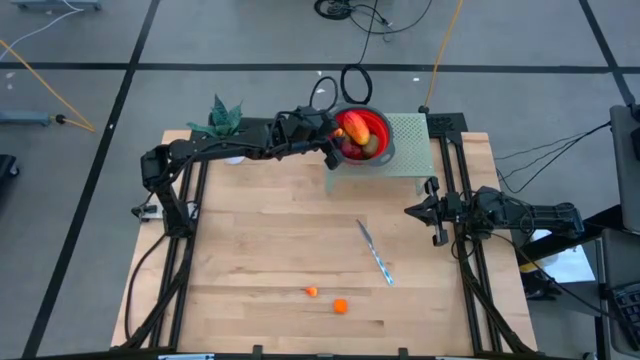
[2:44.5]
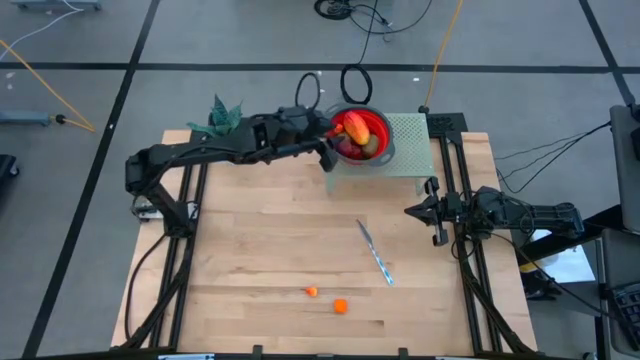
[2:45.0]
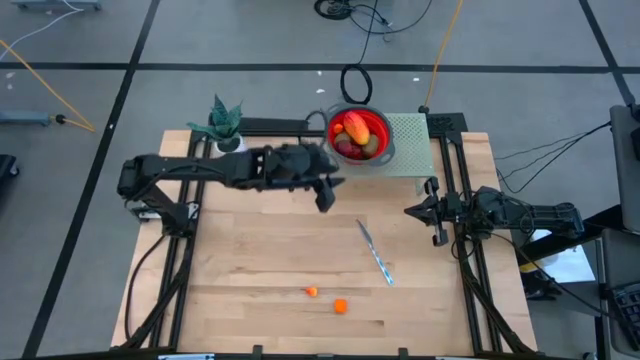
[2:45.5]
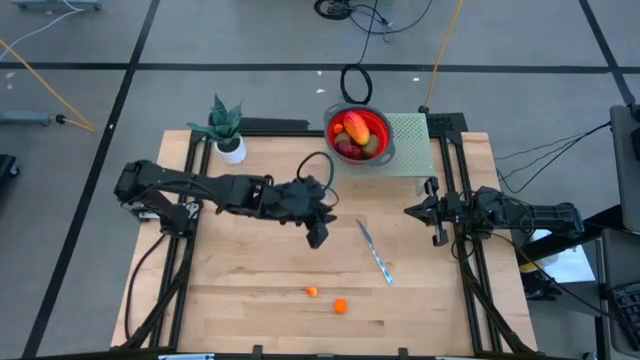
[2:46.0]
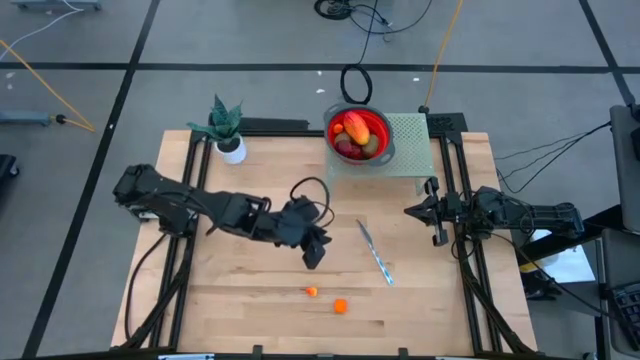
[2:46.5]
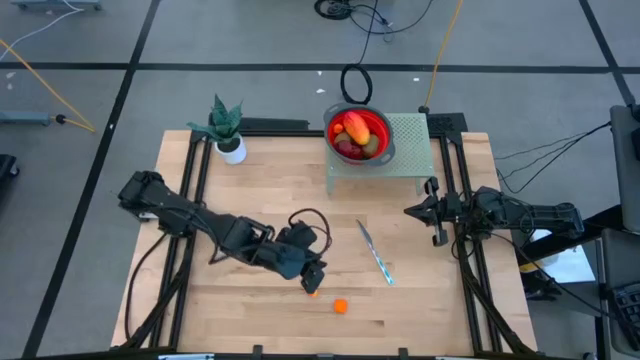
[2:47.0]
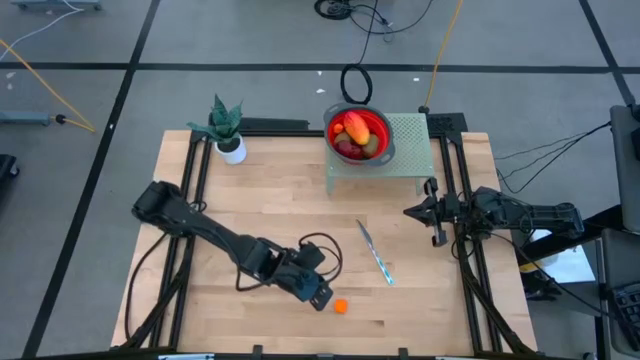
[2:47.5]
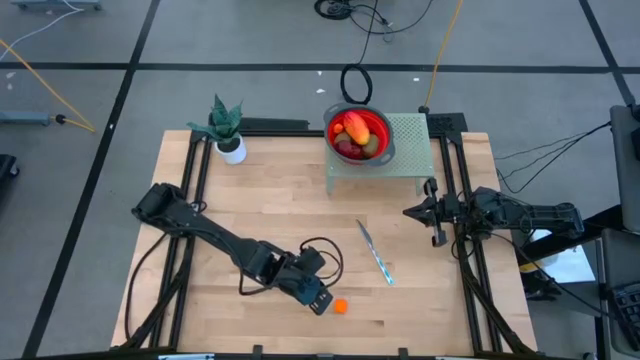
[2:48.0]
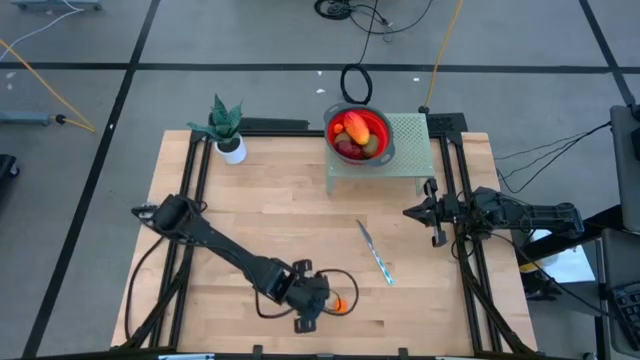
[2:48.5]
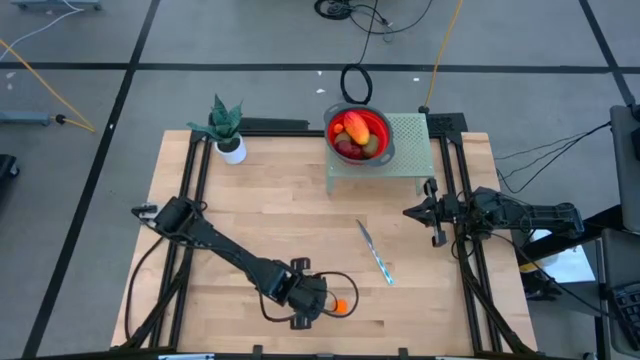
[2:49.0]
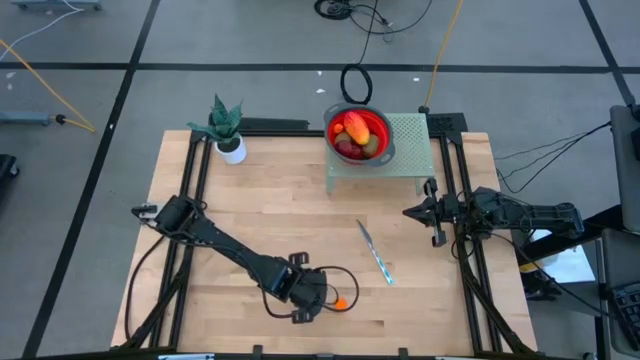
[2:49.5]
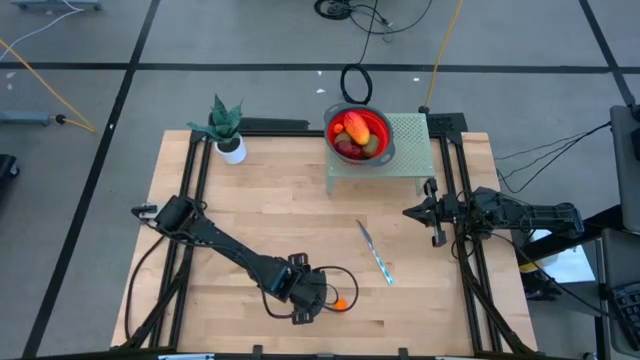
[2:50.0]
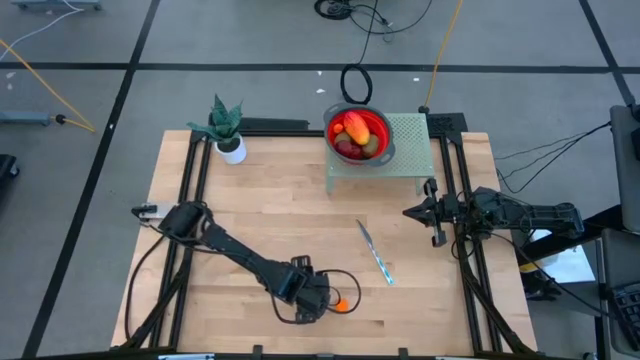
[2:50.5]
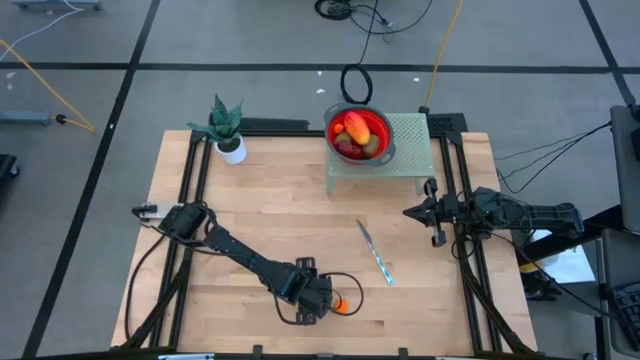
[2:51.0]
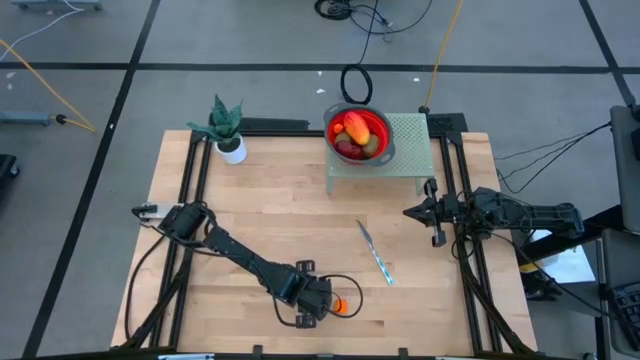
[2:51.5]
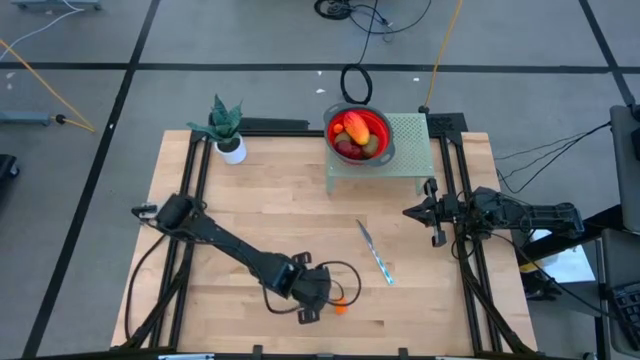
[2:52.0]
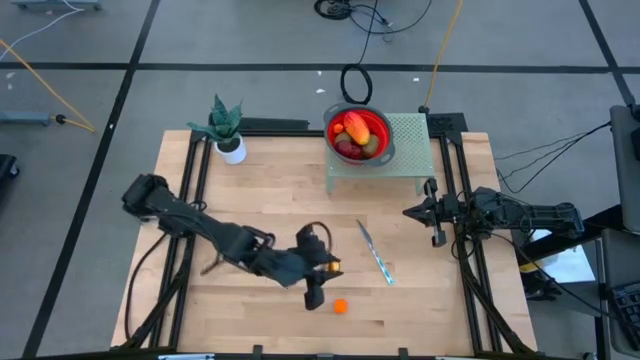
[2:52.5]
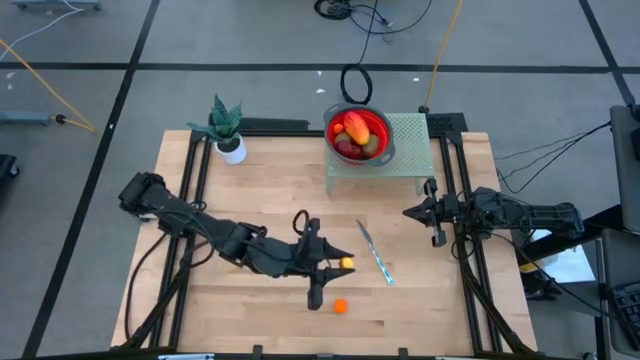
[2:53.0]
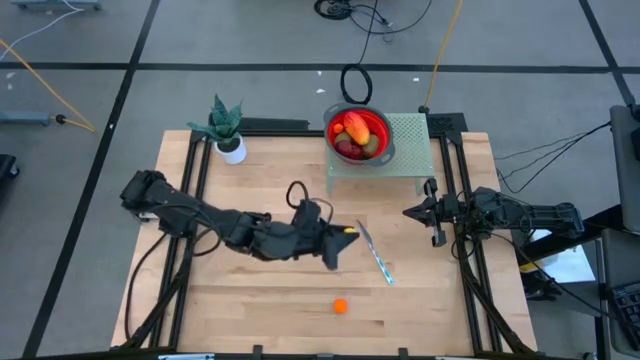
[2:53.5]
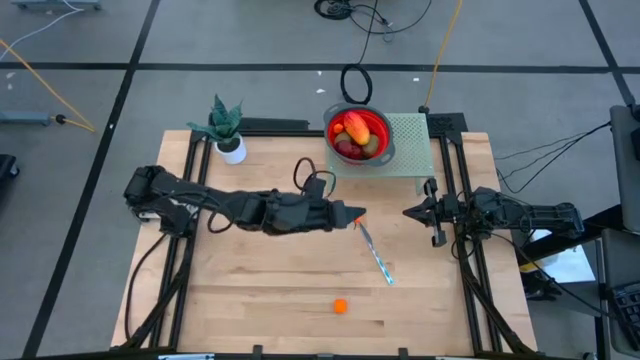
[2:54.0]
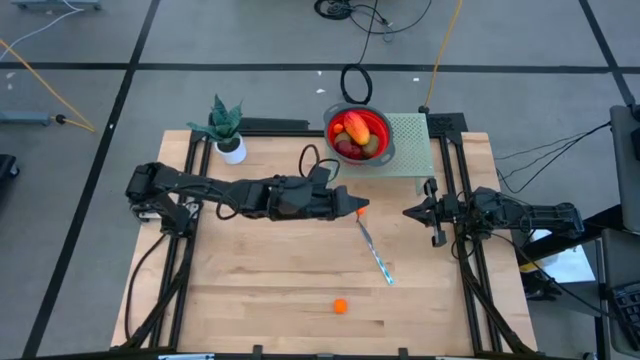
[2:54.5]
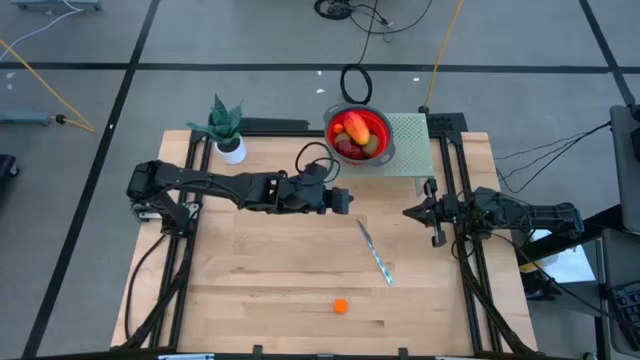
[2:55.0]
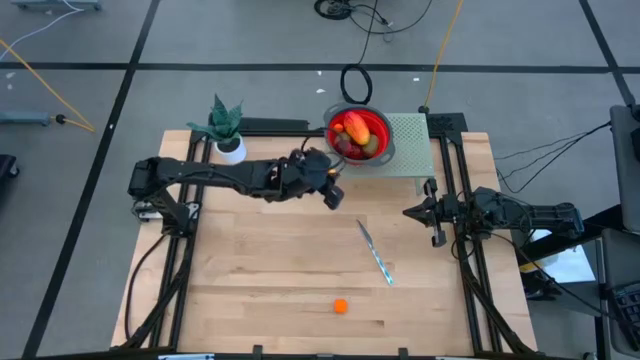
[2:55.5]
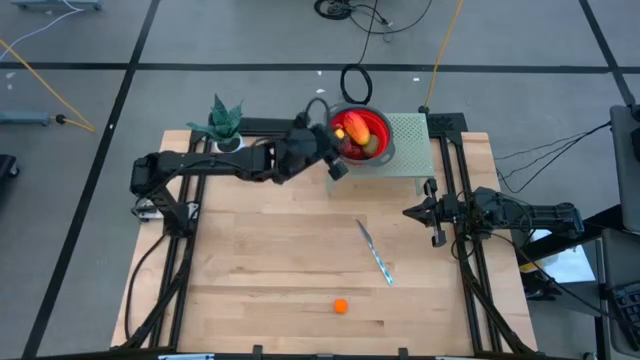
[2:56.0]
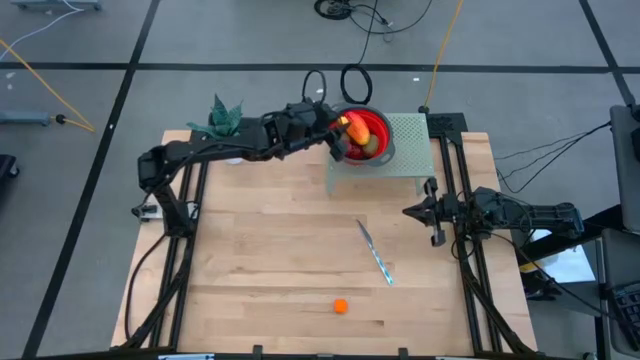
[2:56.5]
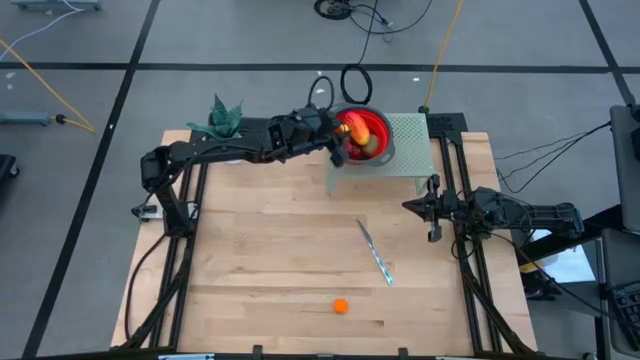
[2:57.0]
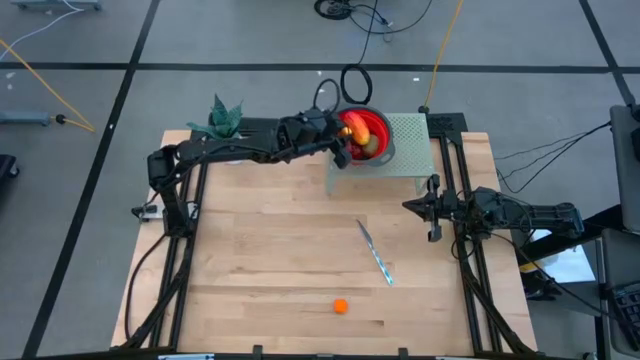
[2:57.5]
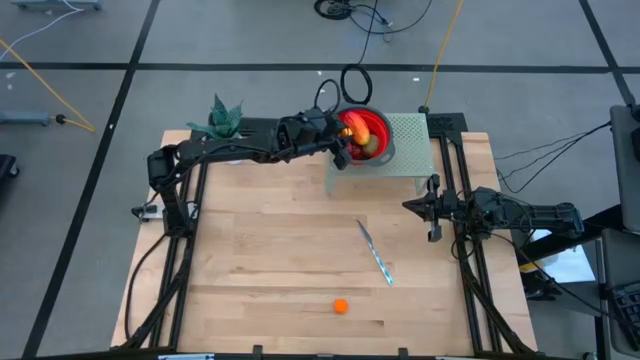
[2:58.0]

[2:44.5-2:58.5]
Task: Pick & Place Fruit
Put the yellow orange peach into the red basket on the shelf

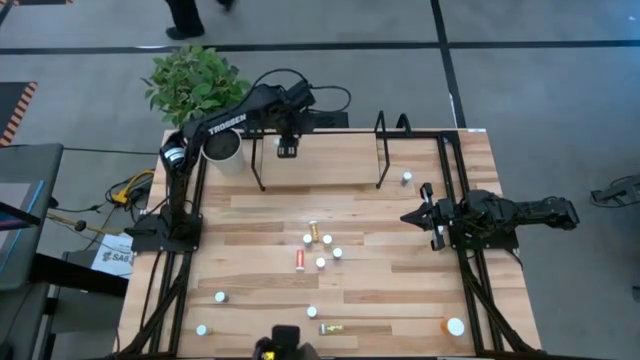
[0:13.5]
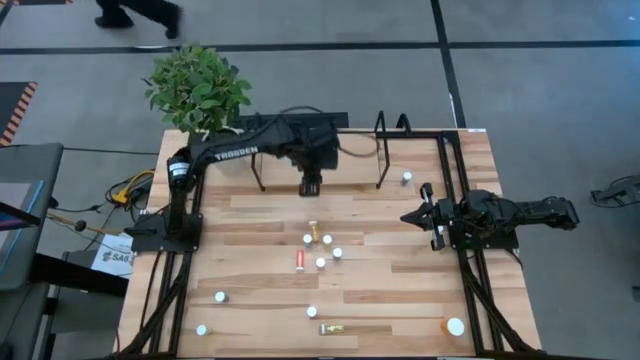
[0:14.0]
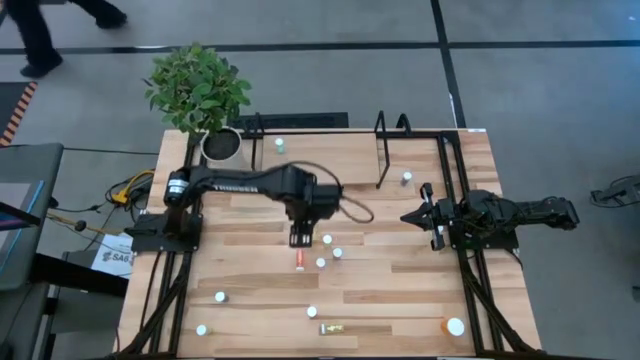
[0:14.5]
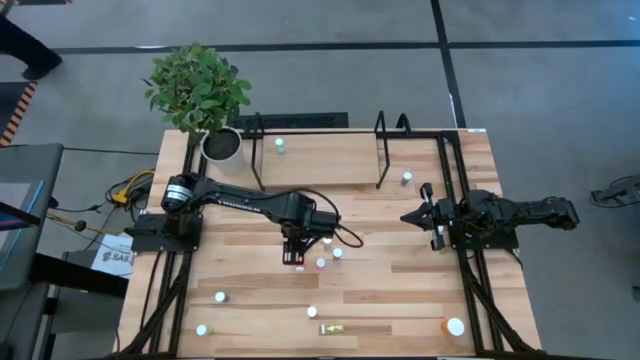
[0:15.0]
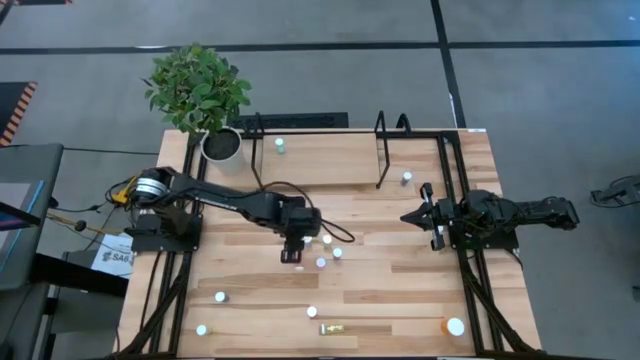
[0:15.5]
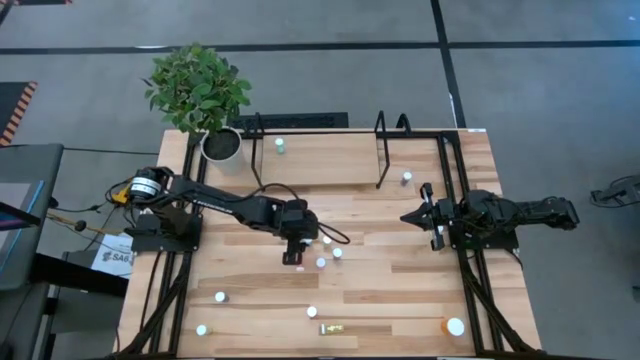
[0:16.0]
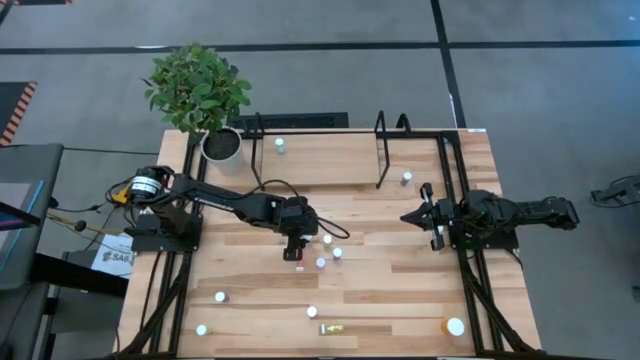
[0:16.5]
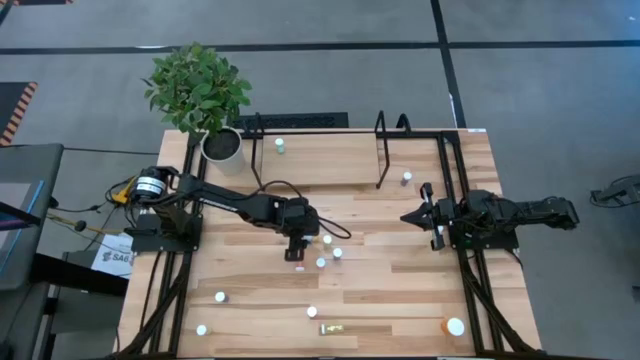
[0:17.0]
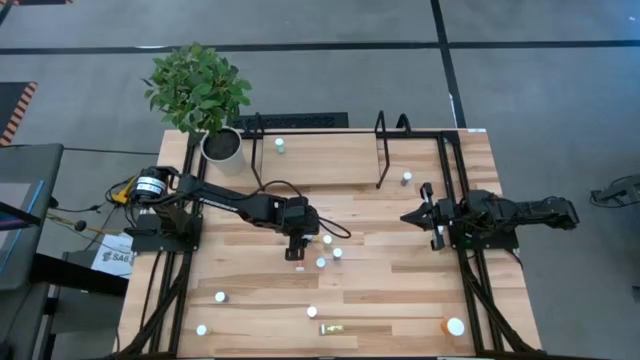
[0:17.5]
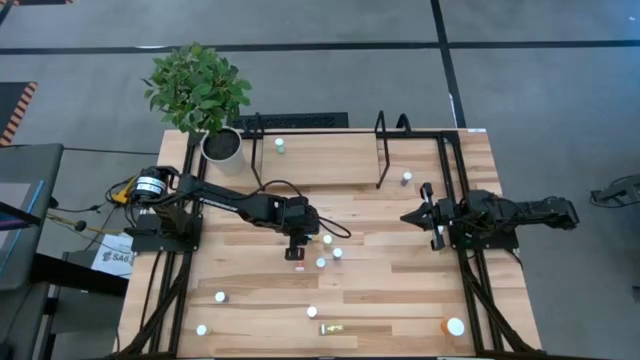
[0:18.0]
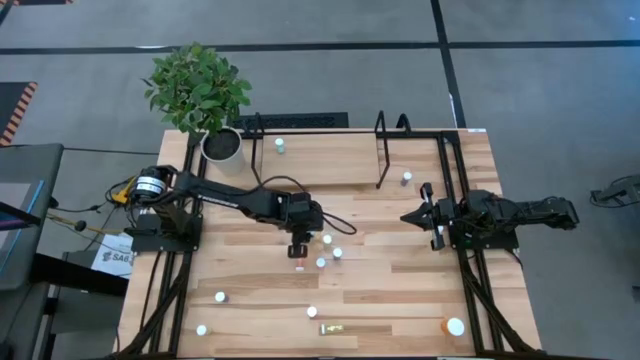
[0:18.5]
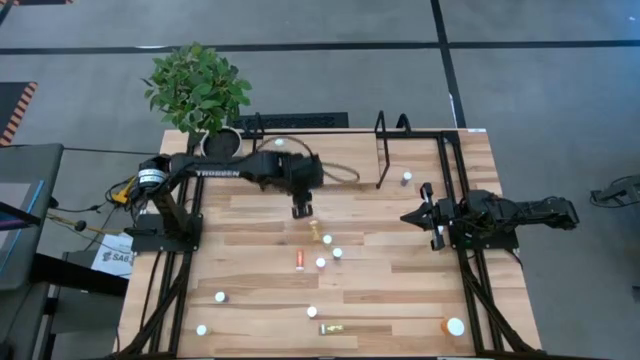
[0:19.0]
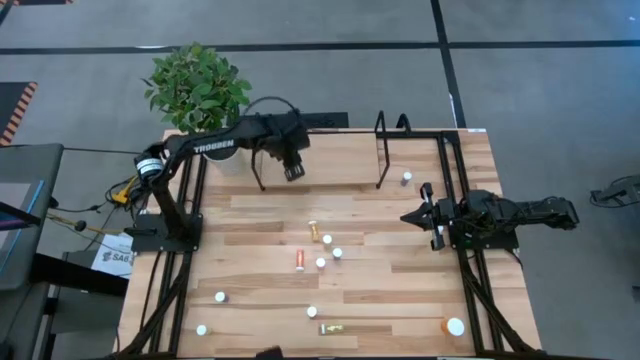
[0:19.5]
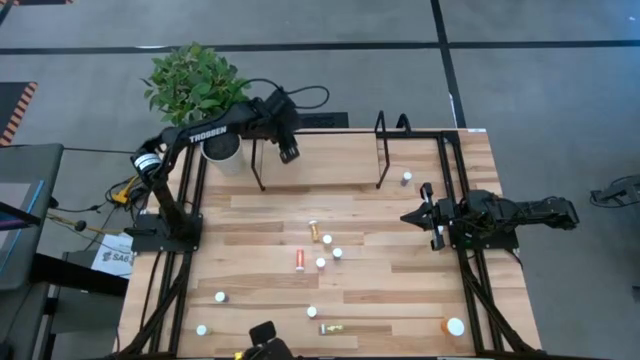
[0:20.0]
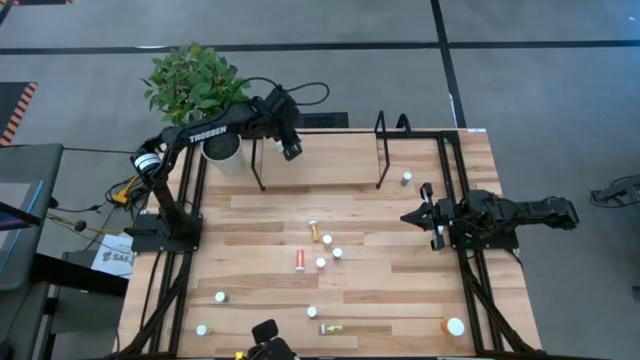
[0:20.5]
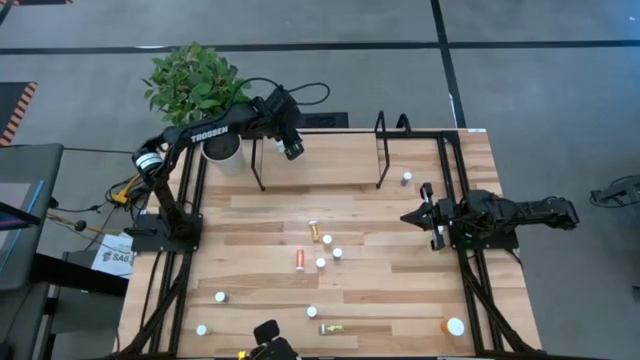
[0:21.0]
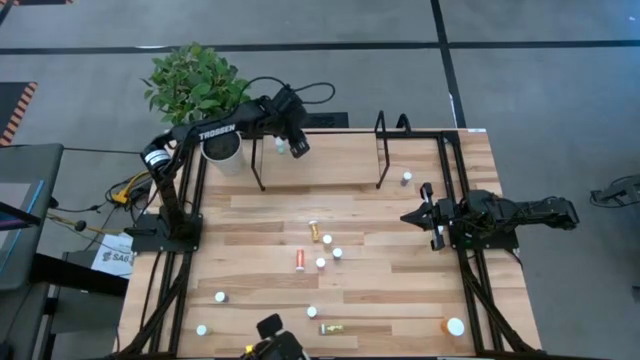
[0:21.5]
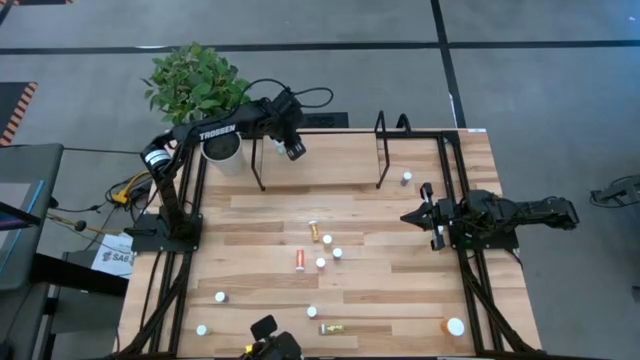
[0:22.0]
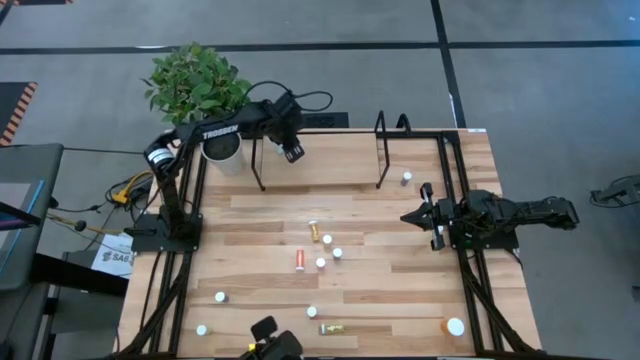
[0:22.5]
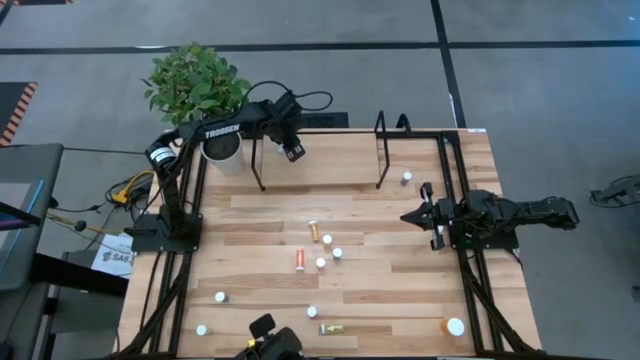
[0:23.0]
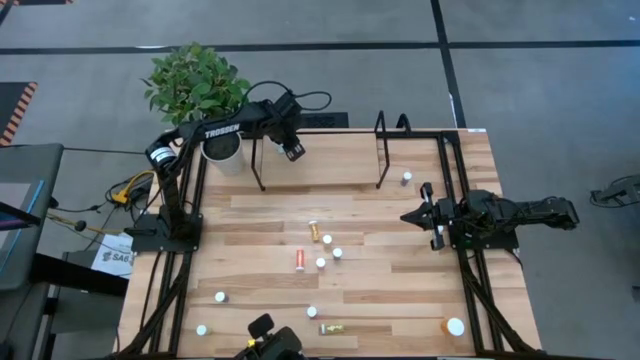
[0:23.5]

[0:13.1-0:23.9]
Task: Pick and place medicine bottles onto shelf by color
Put the blue pill bottle on the shelf
